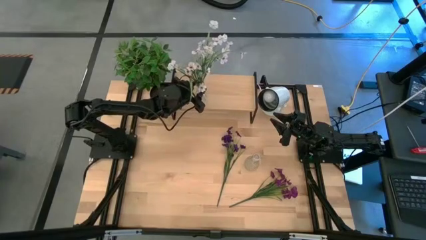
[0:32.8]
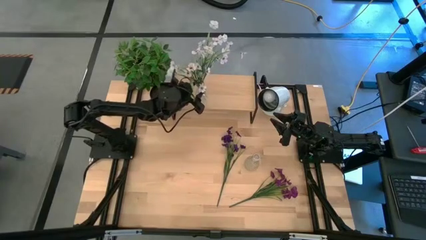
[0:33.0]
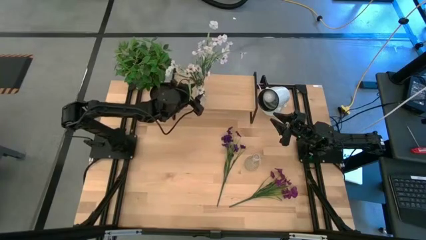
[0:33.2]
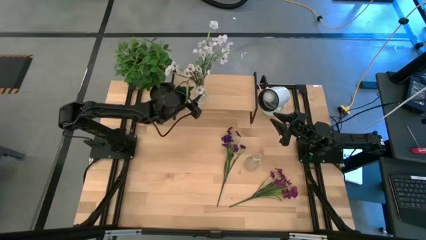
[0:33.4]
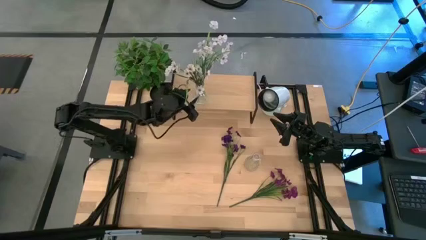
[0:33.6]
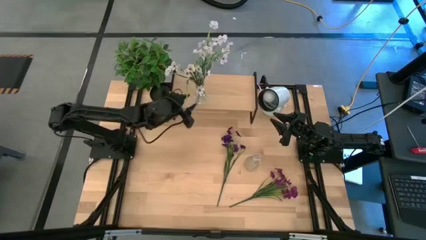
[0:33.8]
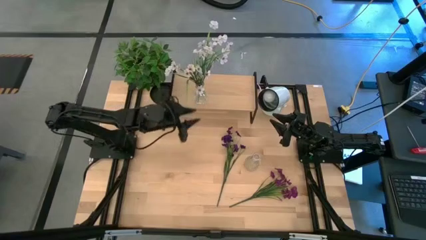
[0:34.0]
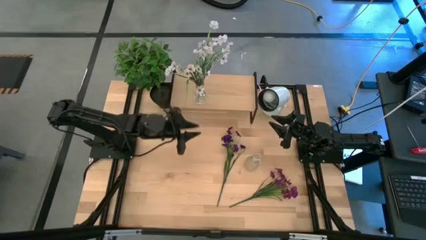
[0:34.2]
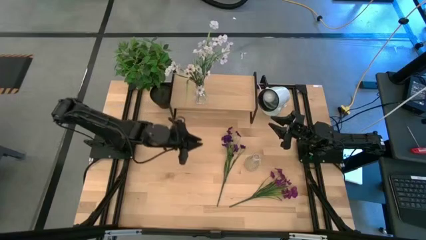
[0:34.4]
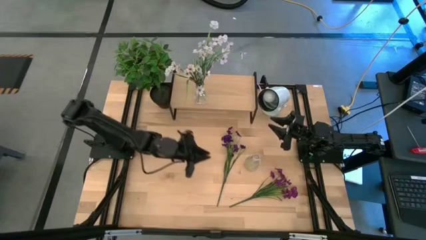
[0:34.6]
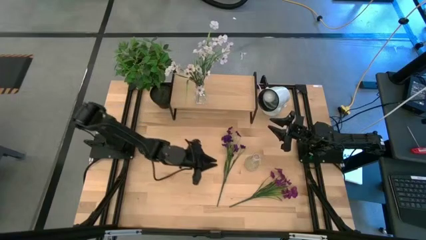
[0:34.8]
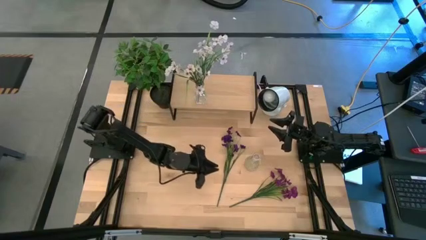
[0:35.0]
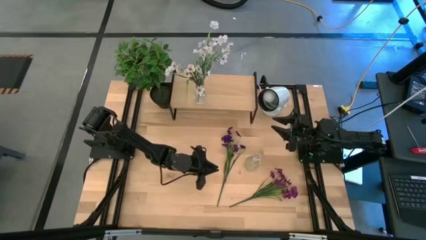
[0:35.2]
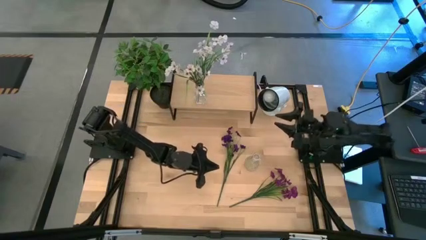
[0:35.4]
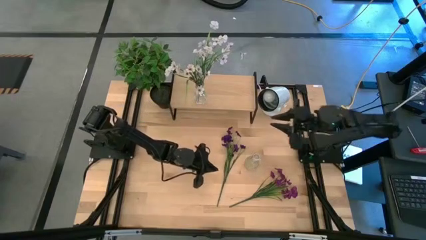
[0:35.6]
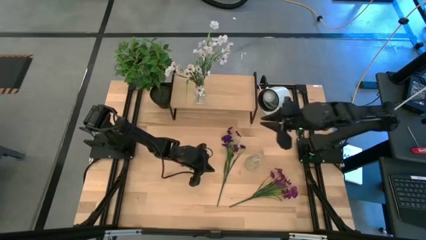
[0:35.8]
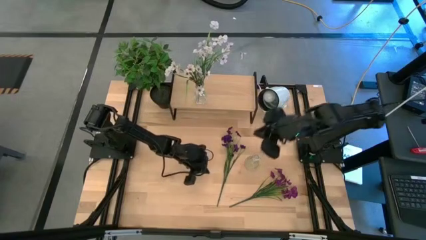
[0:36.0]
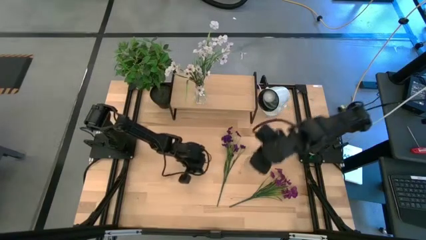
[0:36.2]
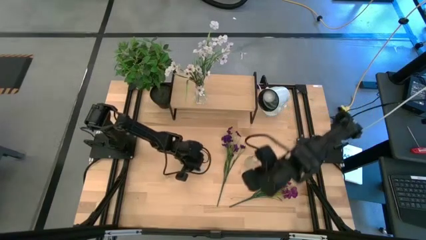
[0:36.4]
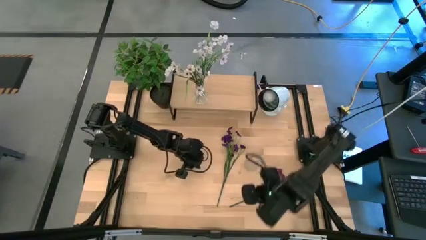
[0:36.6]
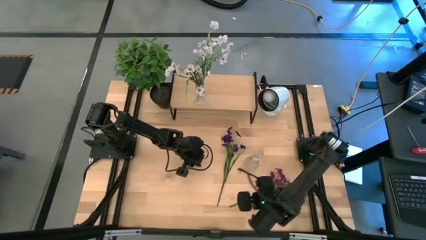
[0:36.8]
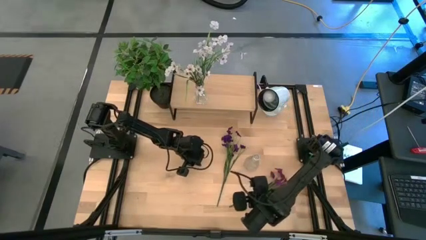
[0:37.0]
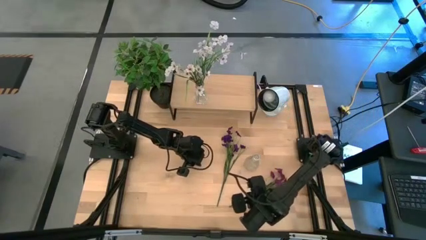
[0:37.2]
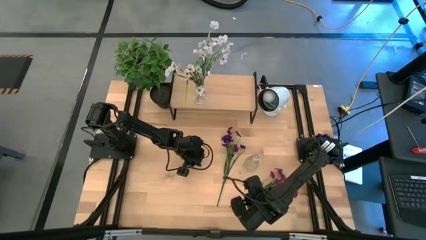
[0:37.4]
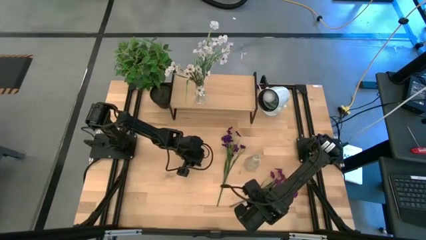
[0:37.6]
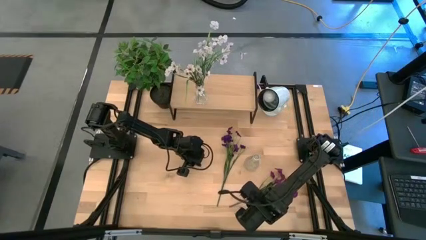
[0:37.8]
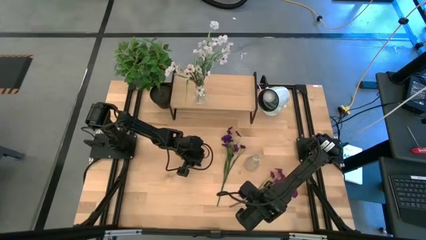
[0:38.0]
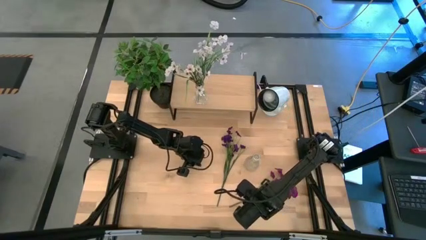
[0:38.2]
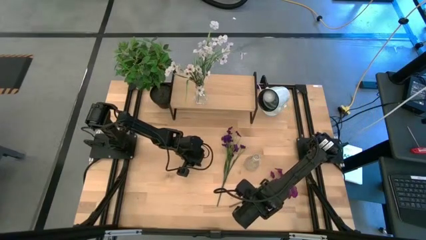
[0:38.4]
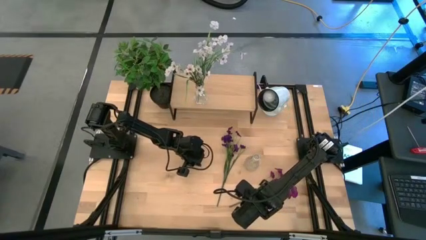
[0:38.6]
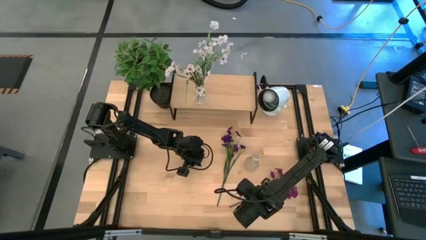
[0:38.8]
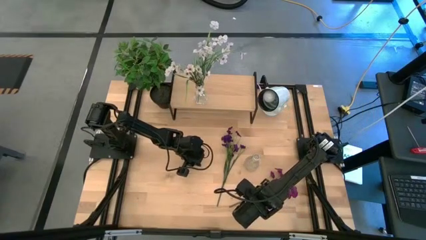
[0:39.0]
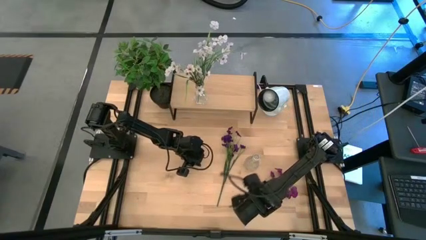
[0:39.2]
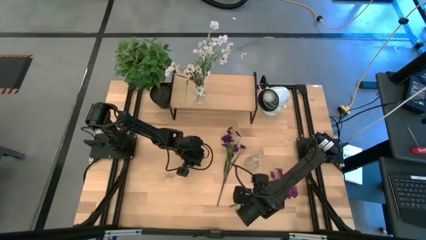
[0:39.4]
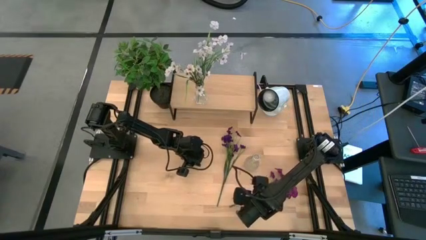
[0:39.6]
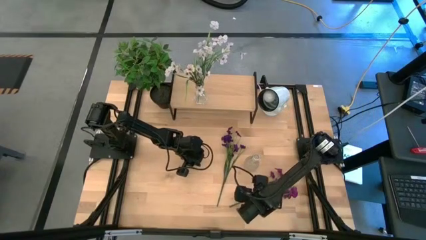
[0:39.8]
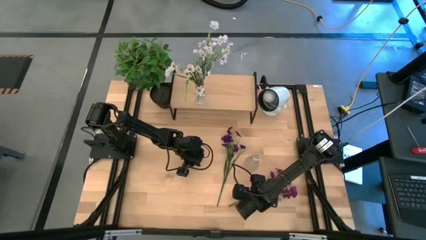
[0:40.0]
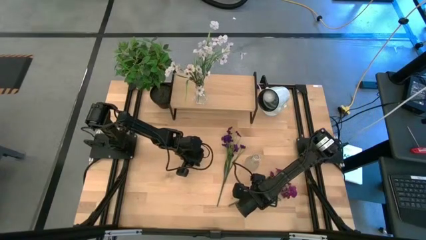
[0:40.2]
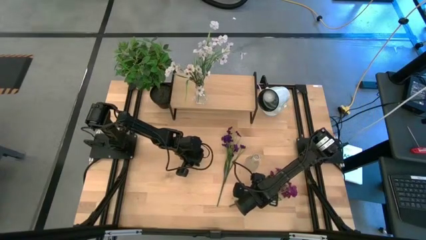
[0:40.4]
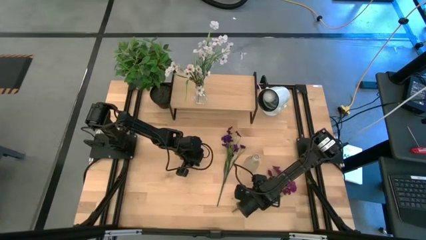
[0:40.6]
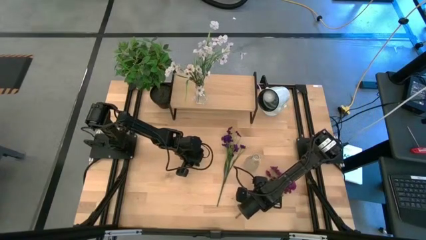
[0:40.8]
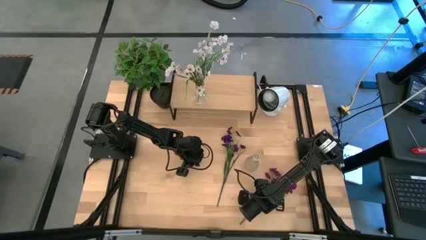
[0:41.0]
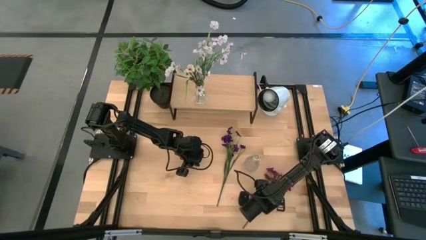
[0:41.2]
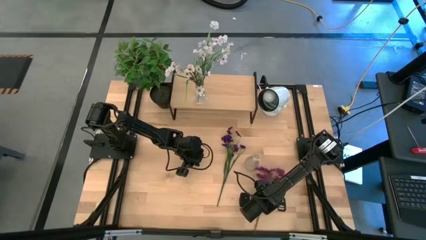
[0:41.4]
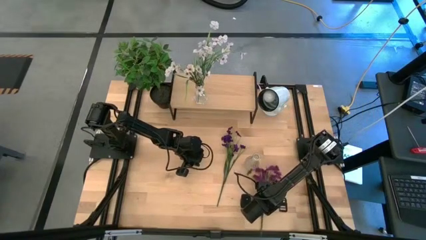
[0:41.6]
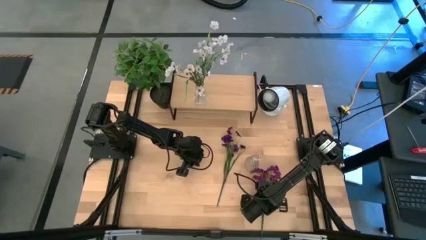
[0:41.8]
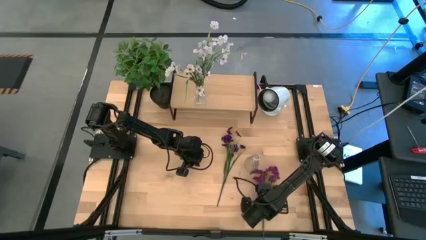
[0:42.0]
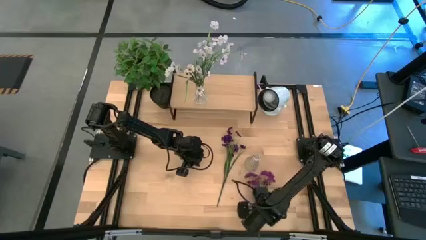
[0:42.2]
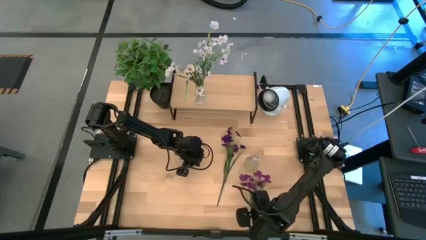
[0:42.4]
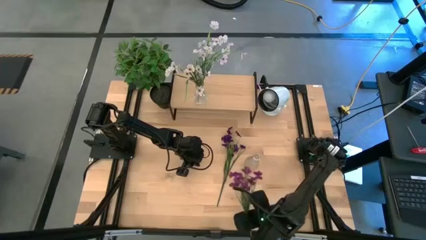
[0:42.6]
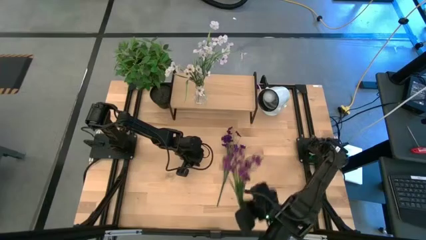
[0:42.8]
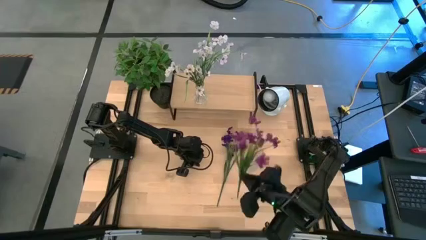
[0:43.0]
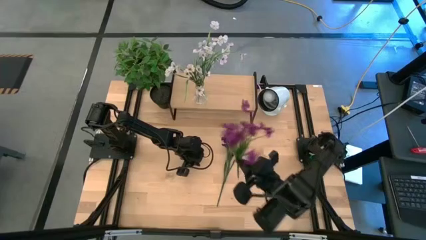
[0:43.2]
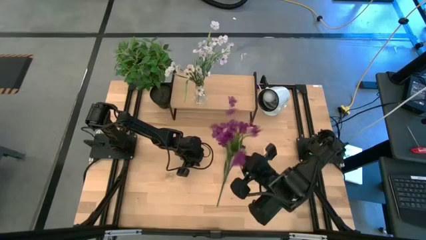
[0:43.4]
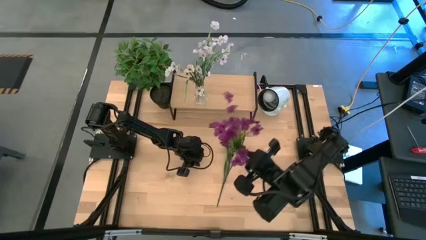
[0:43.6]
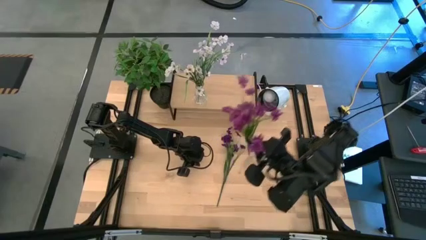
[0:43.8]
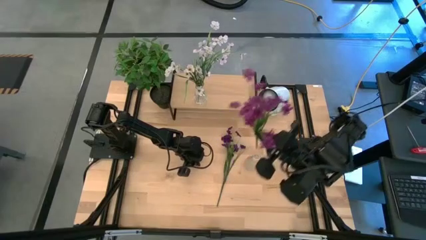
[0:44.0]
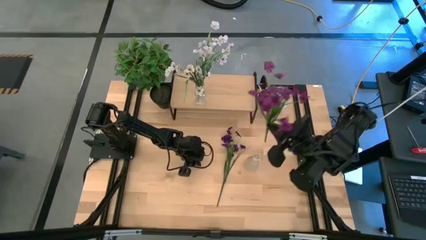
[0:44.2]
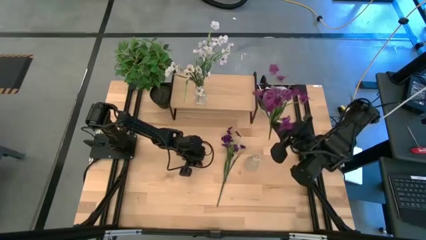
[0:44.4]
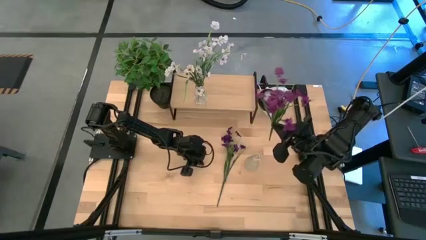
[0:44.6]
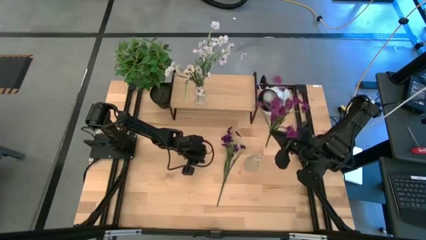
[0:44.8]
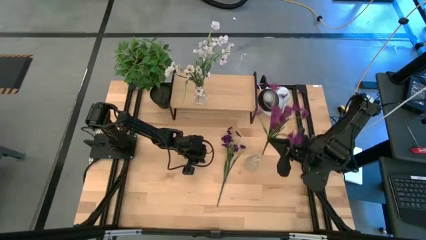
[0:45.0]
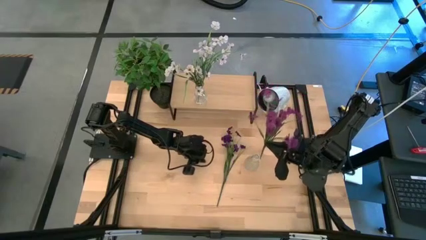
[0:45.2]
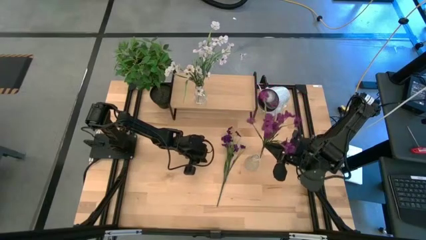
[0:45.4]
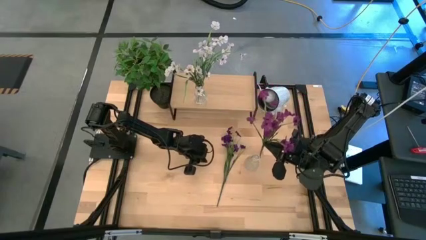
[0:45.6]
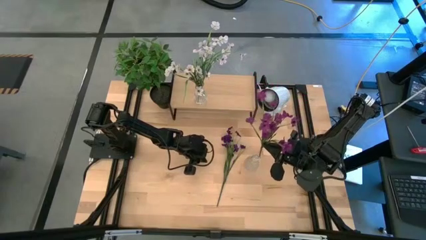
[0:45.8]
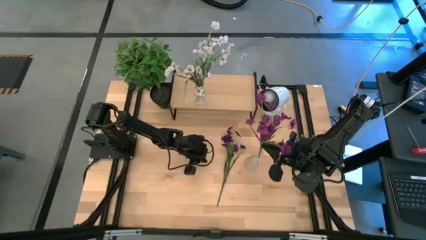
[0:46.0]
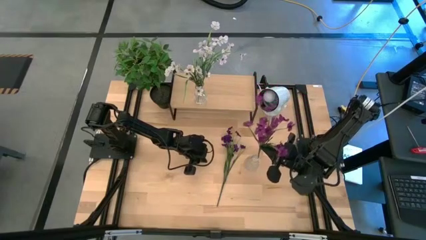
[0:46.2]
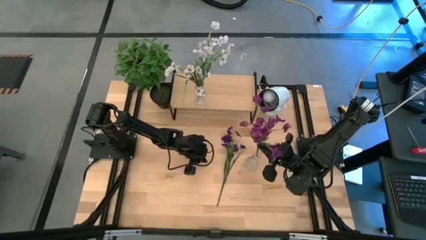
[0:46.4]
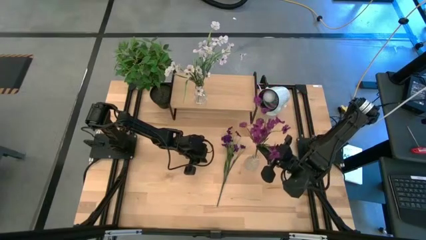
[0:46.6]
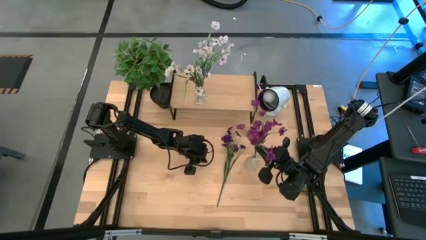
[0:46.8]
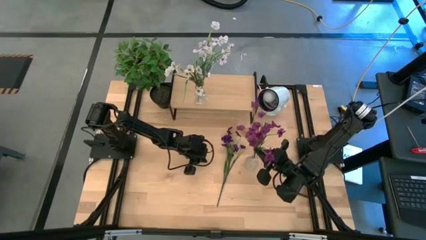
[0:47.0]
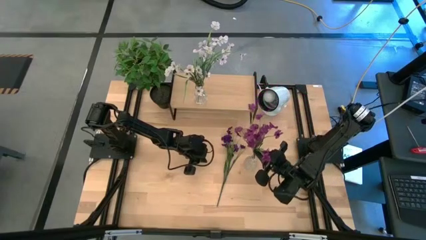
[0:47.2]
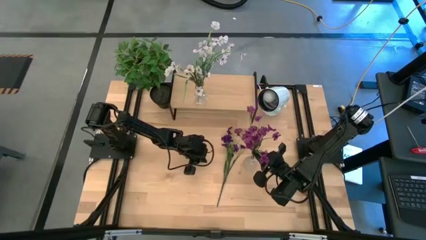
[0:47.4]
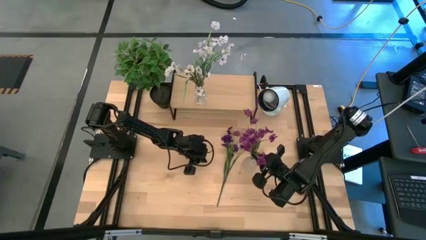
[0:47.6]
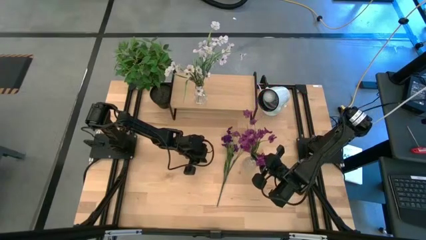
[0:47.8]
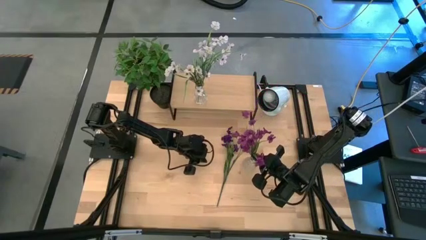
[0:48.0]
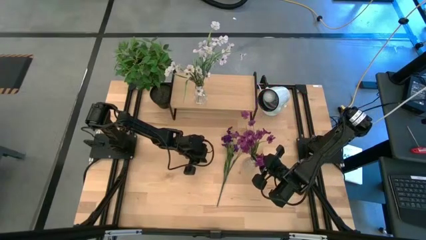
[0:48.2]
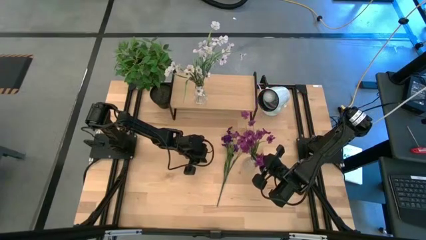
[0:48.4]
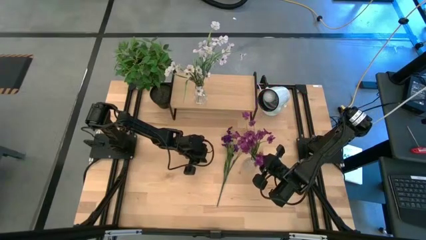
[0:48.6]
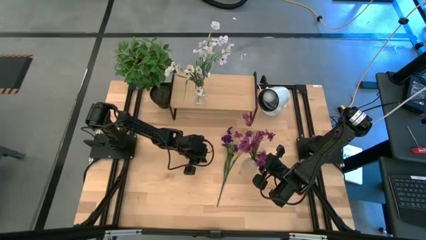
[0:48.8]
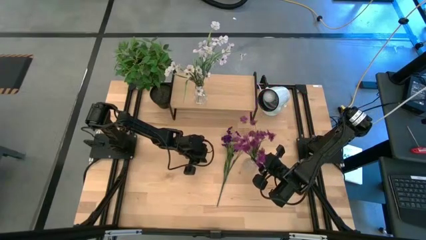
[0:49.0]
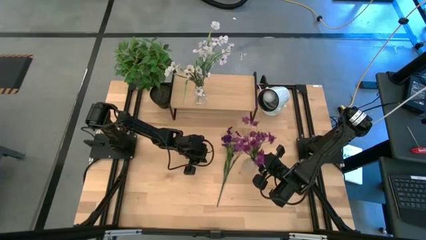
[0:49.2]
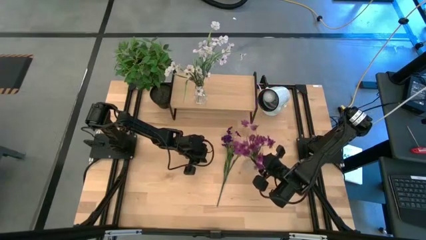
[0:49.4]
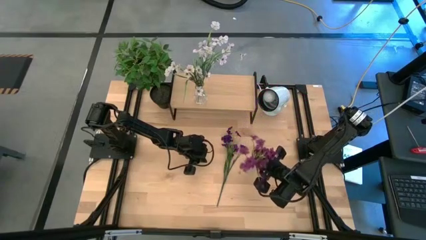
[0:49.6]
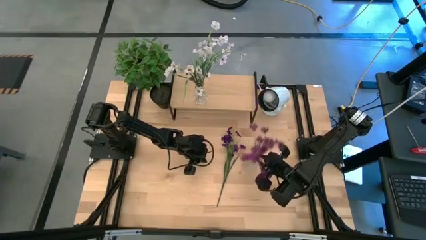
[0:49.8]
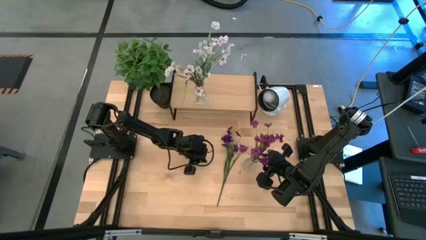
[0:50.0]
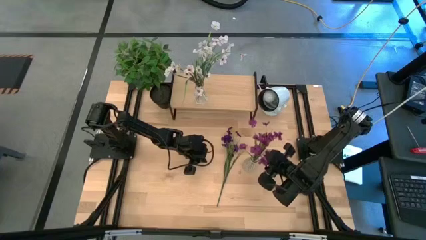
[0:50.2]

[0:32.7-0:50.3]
Task: Pick and place flowers into a vace then onto a shelf
Put the pink flowers into the transparent vase
